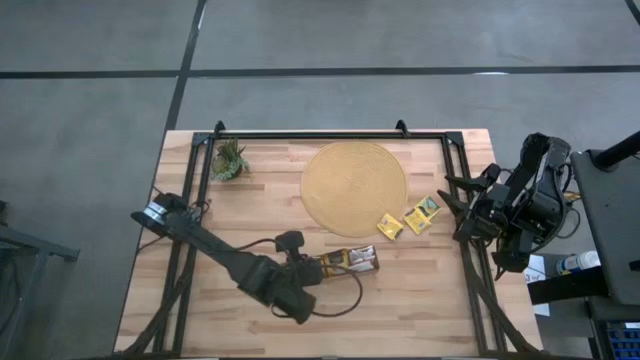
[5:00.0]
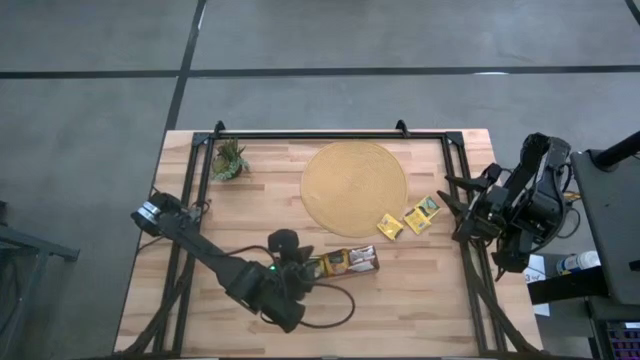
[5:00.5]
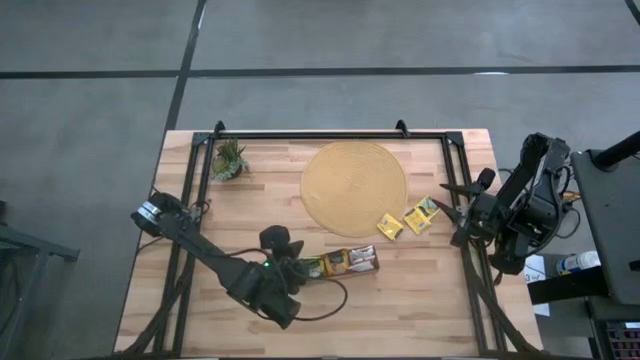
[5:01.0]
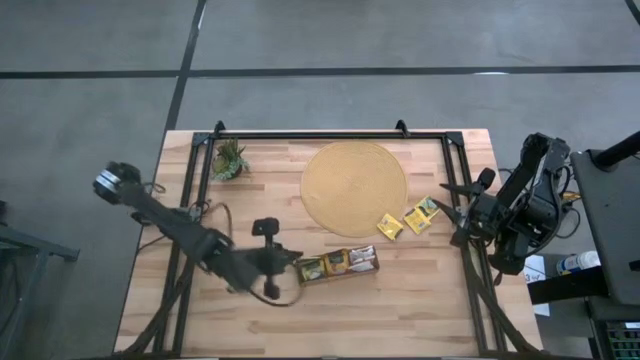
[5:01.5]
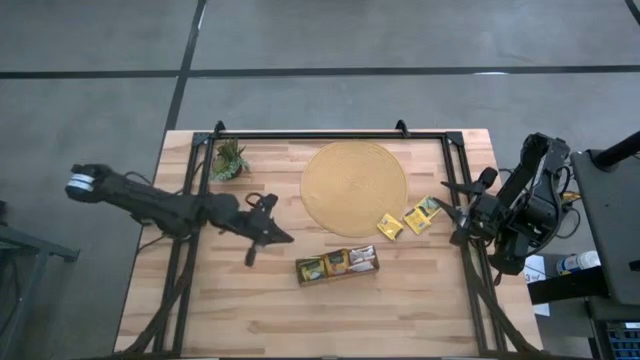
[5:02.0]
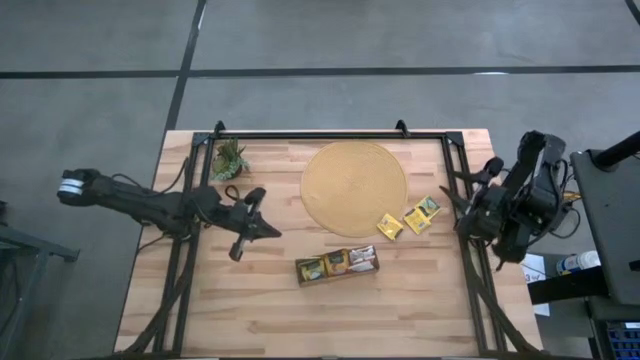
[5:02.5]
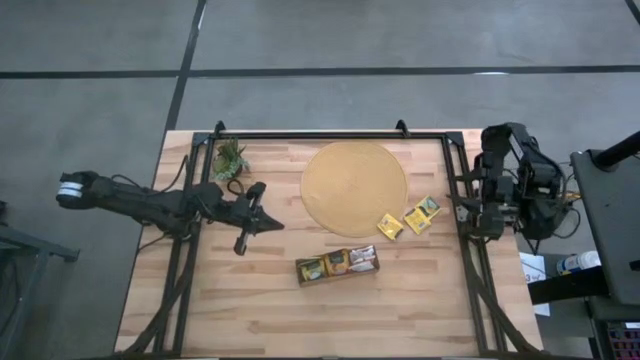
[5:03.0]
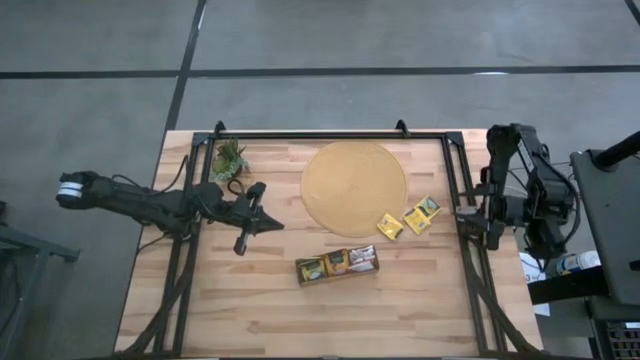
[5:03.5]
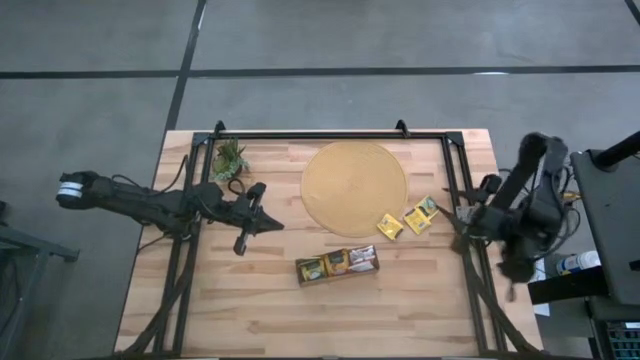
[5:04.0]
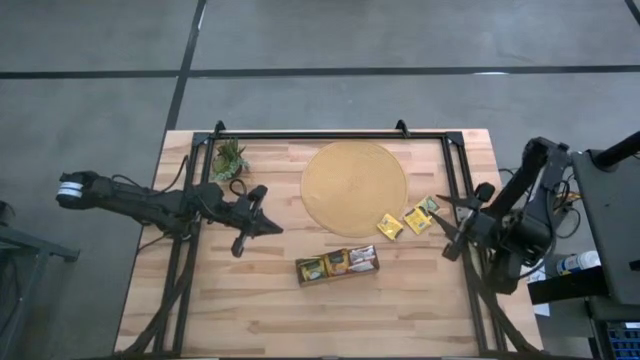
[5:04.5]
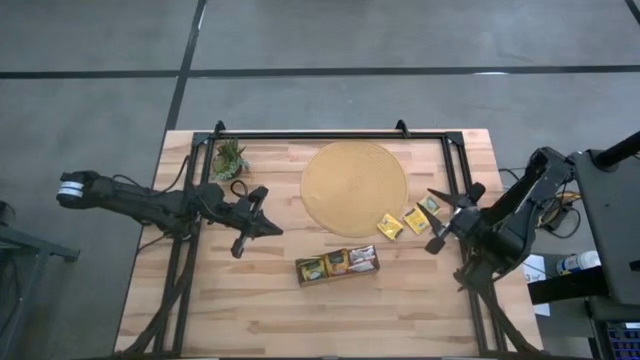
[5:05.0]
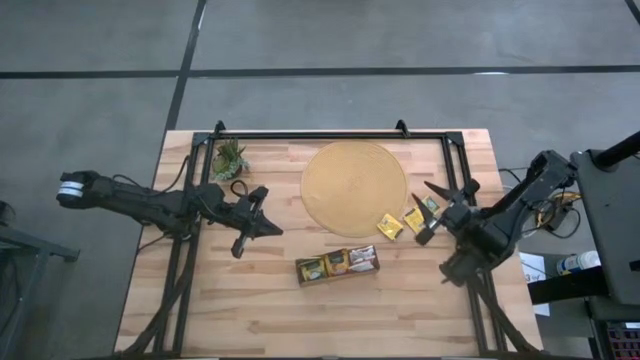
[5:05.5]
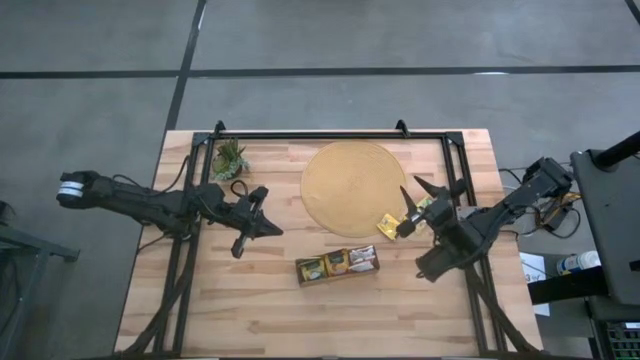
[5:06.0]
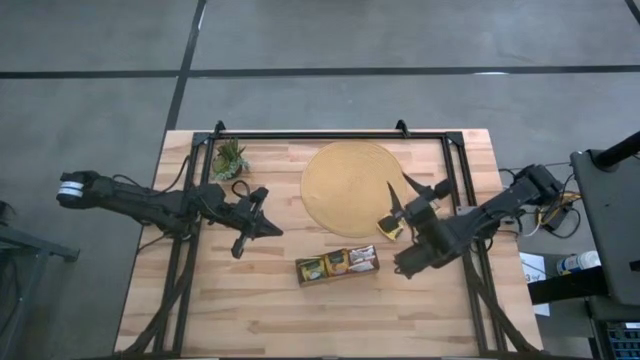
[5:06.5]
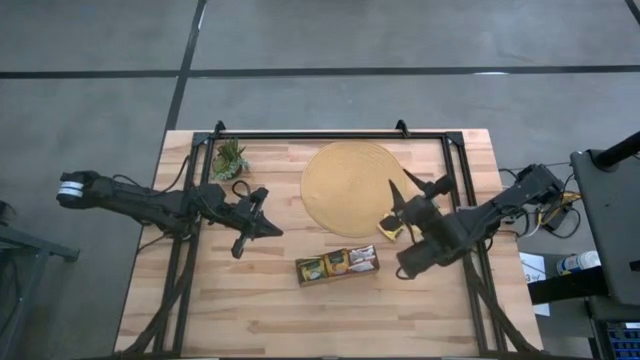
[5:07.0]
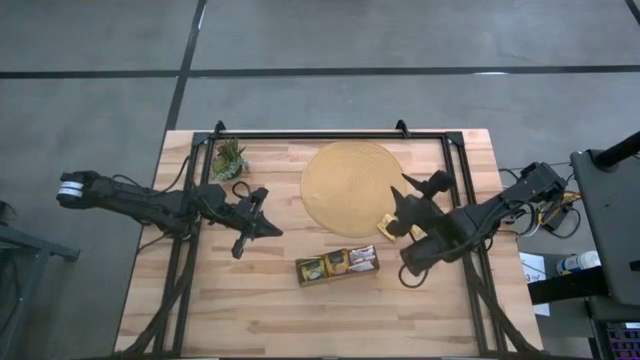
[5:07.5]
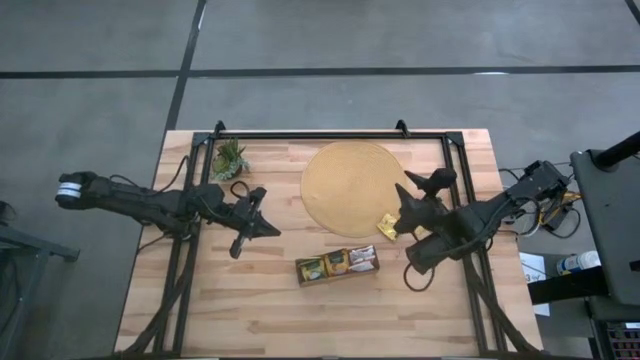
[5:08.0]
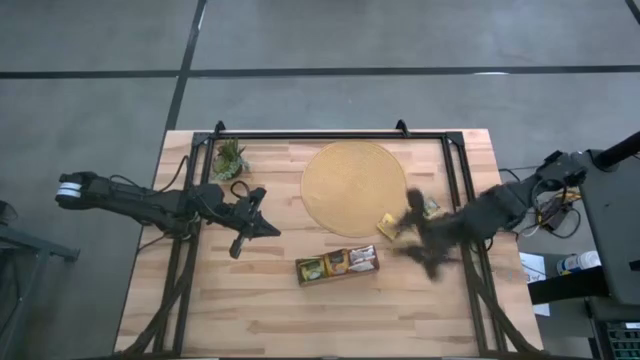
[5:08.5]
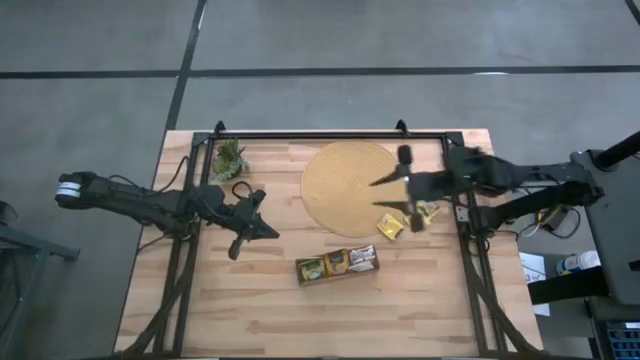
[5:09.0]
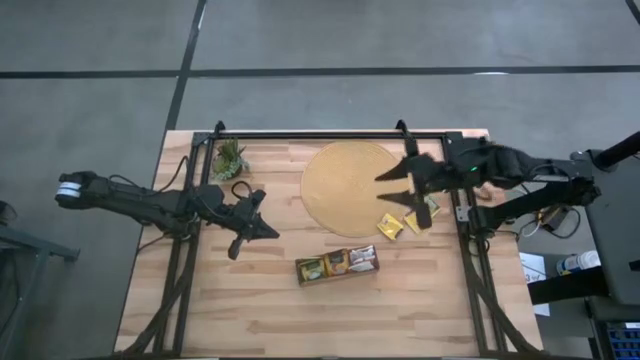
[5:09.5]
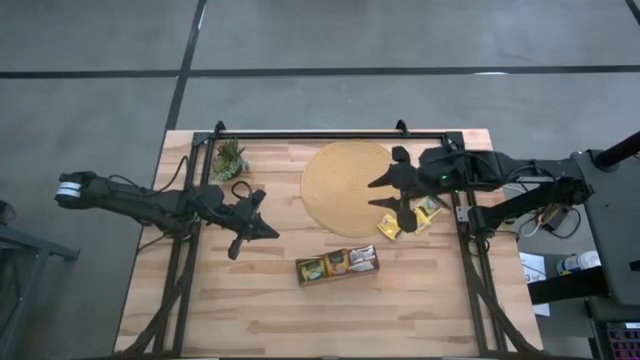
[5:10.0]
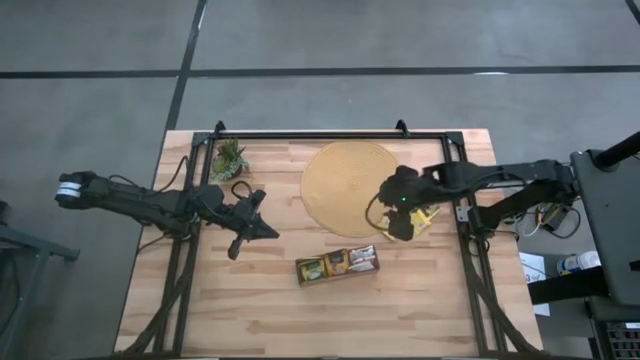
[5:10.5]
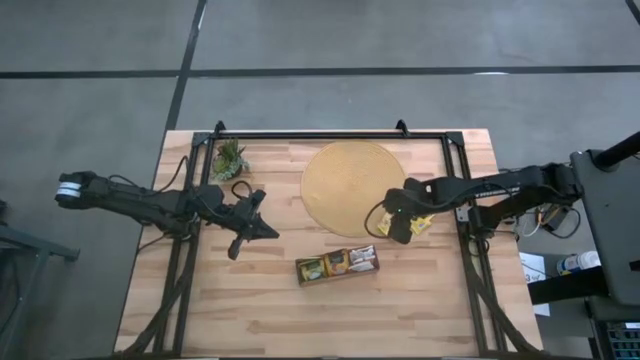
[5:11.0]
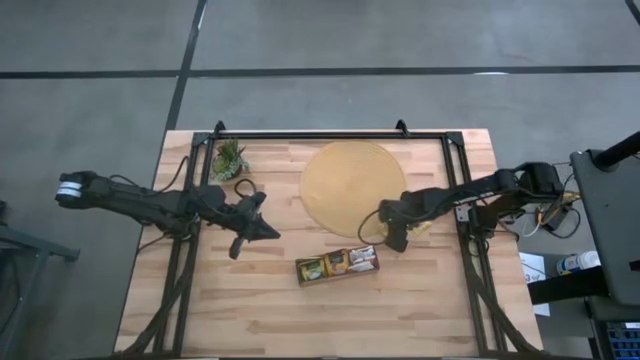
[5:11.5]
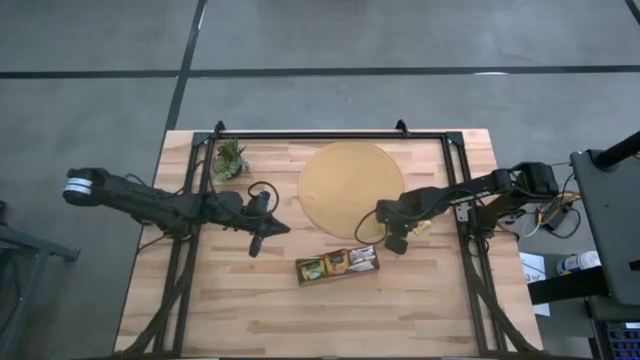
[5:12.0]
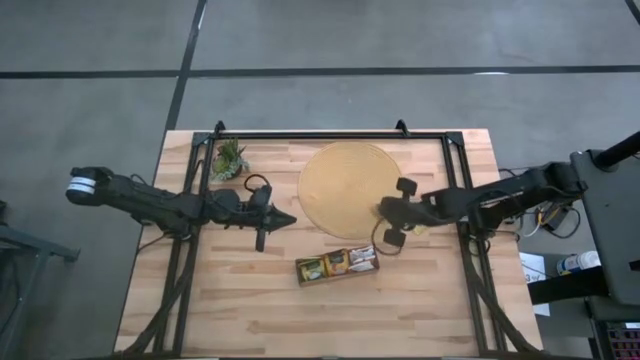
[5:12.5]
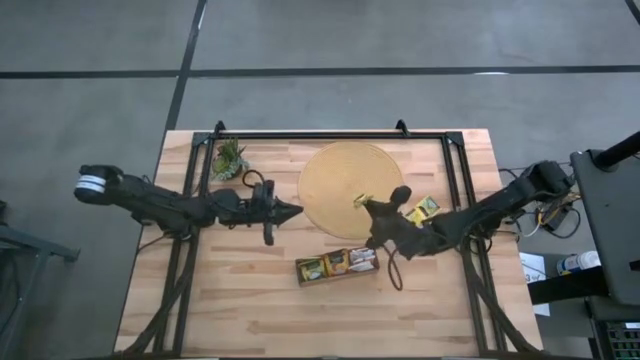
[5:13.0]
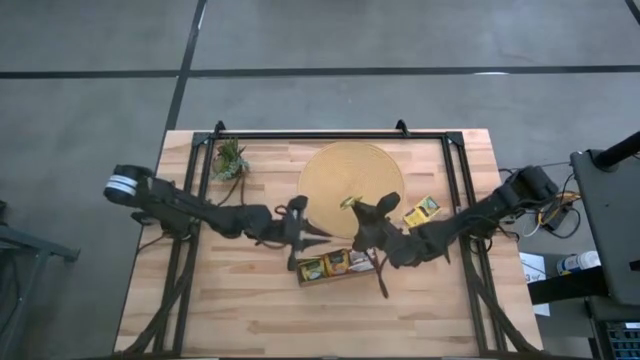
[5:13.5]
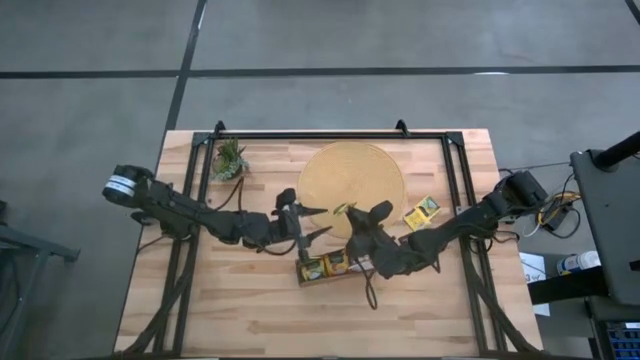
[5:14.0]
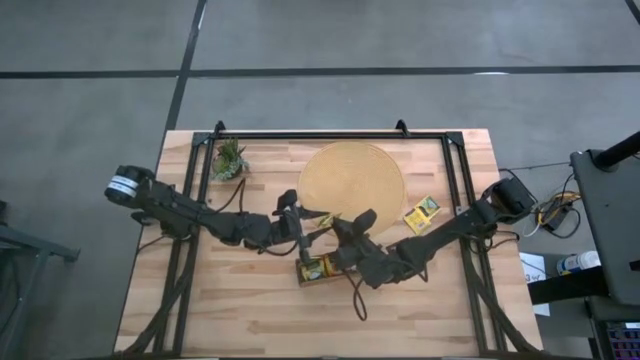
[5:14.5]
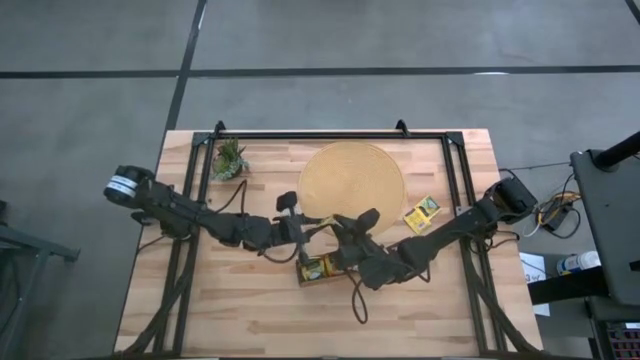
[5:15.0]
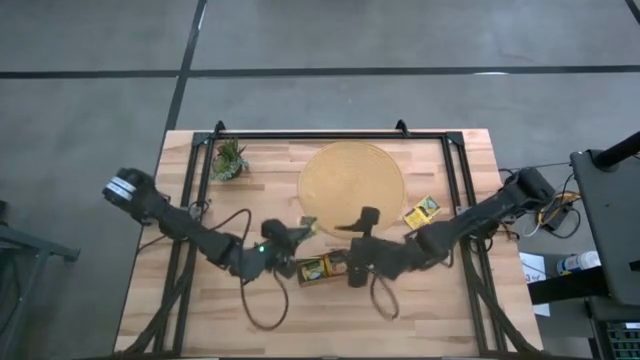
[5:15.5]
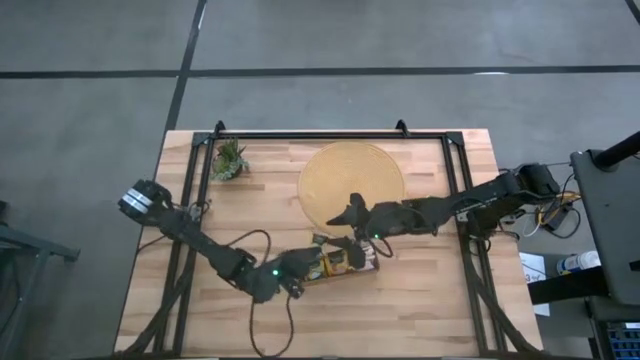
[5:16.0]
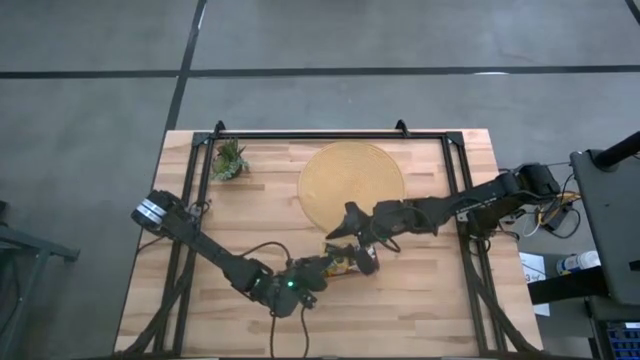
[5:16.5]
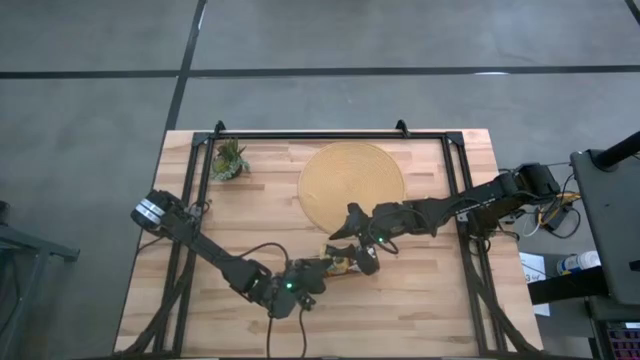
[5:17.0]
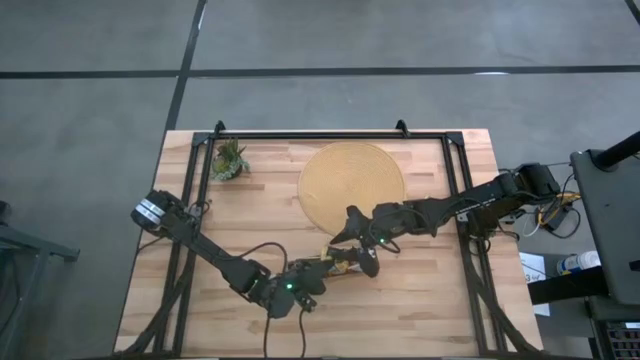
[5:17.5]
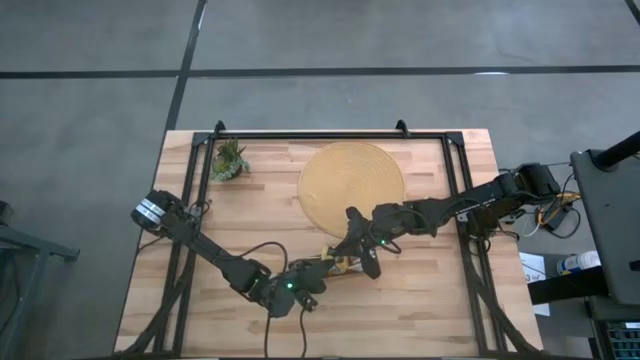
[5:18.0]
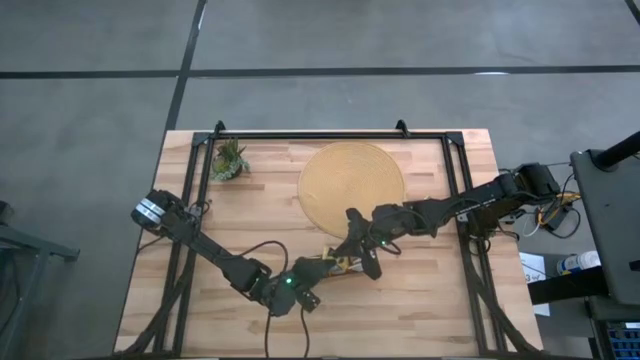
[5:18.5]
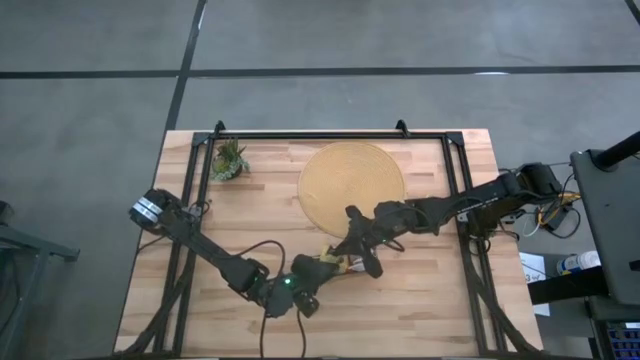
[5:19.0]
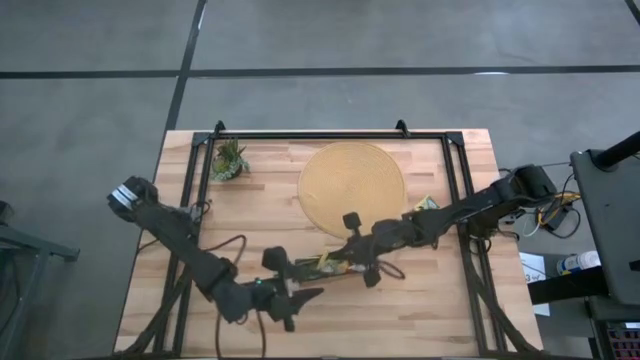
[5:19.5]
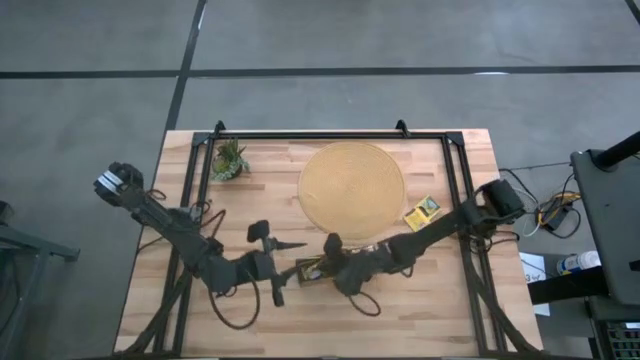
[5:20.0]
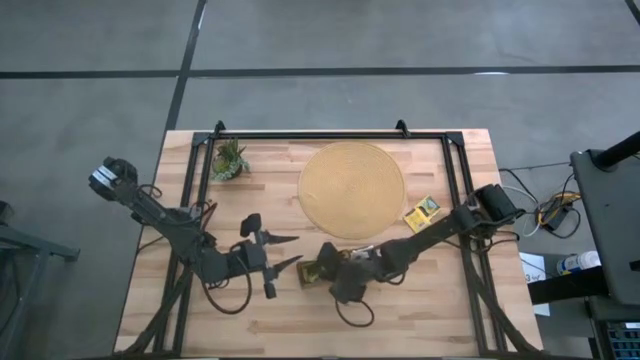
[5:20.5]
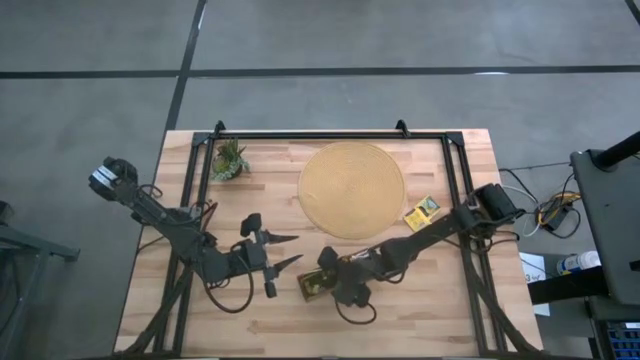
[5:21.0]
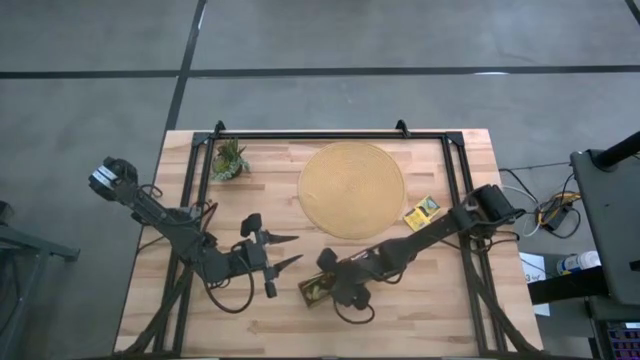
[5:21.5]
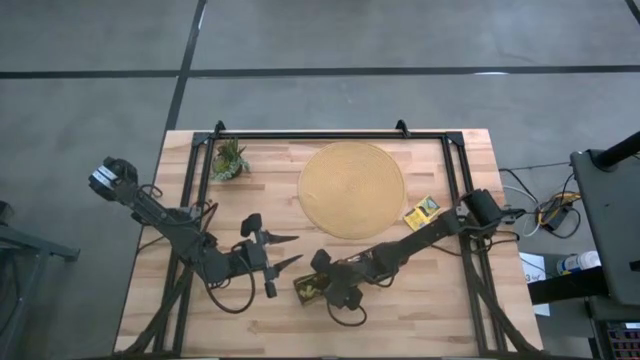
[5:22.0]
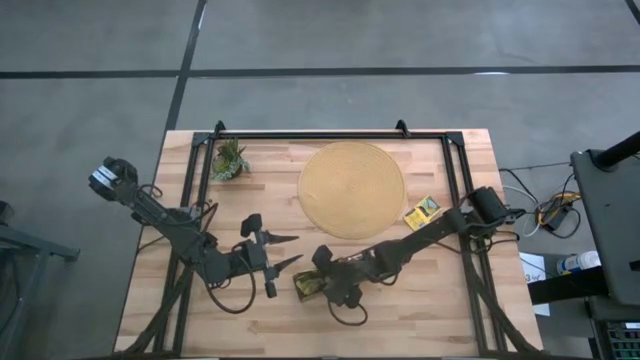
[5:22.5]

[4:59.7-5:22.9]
Task: Pick & Place Tea
Put the yellow tea bag into the left section of the wooden organizer
